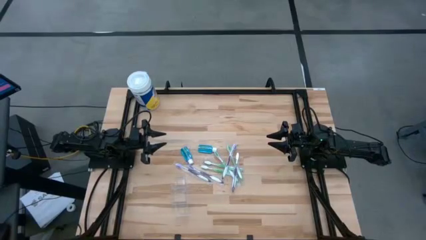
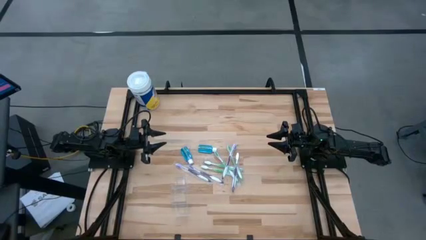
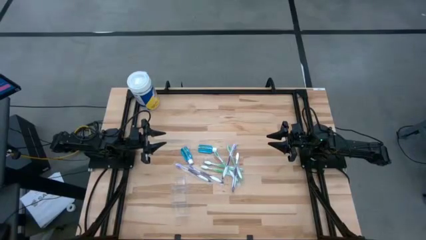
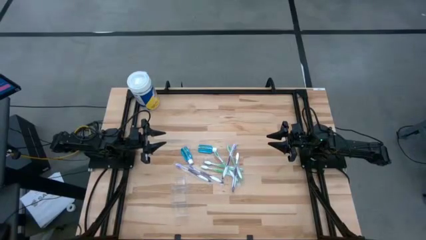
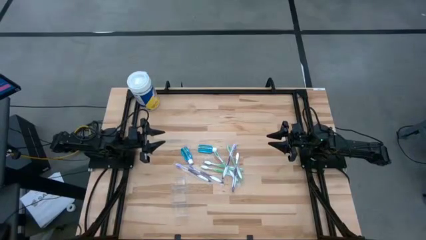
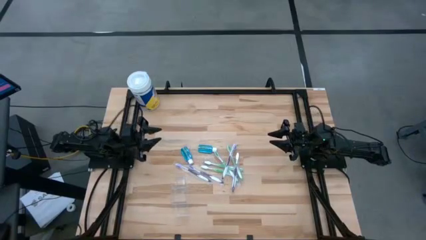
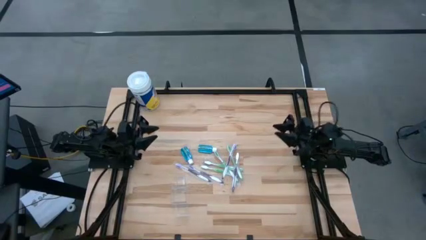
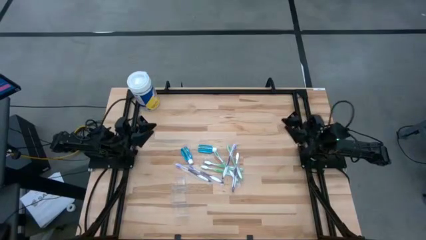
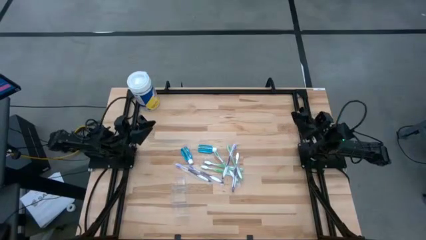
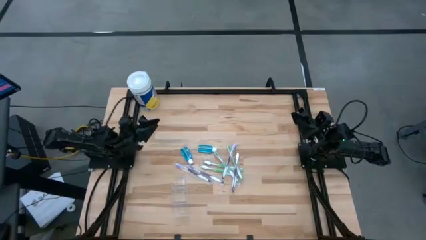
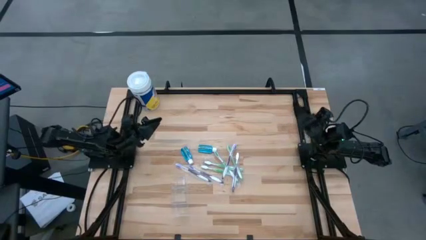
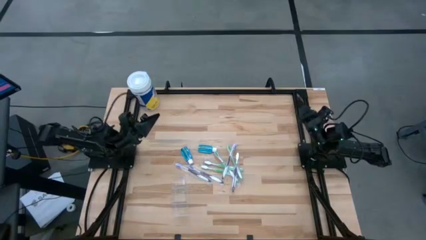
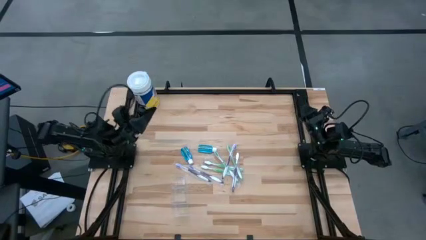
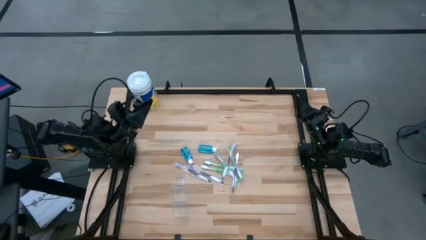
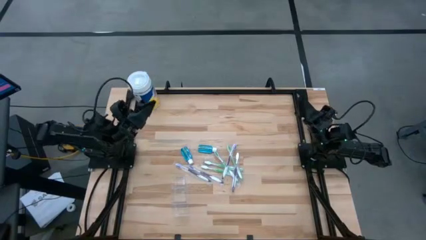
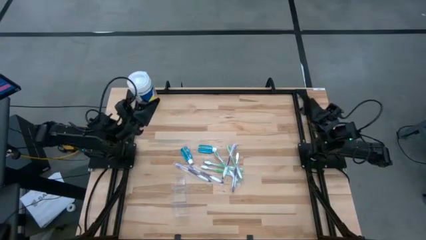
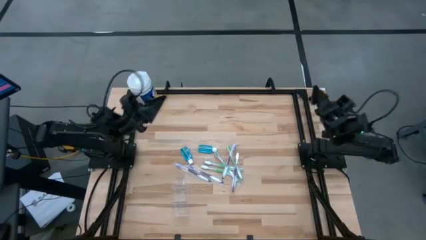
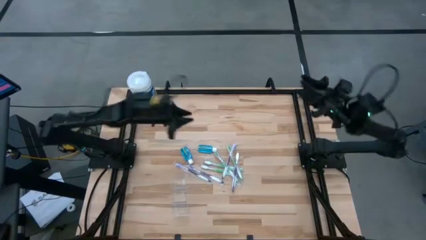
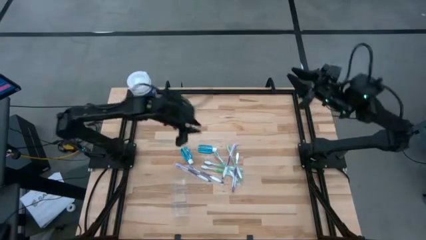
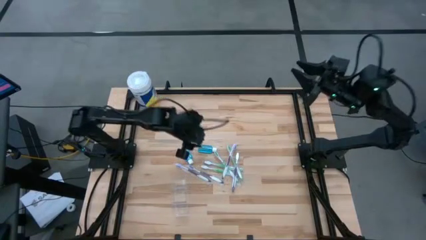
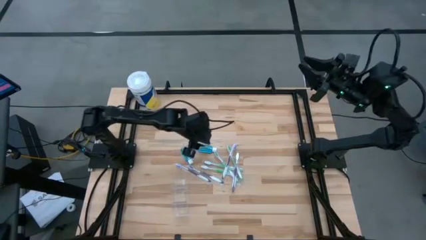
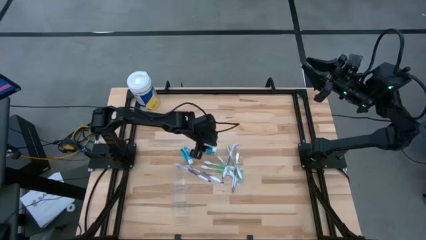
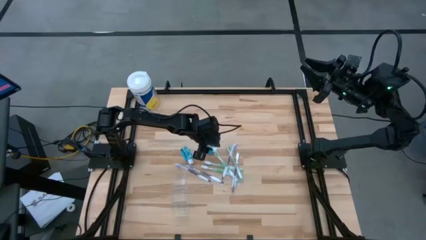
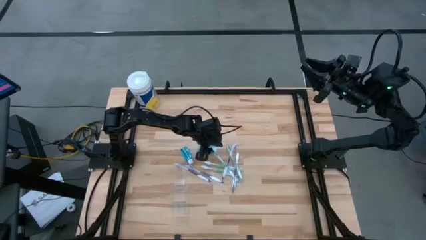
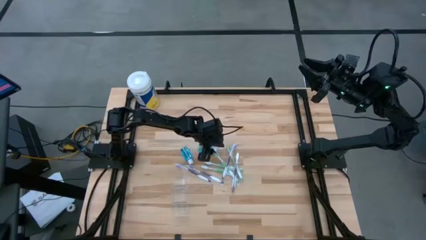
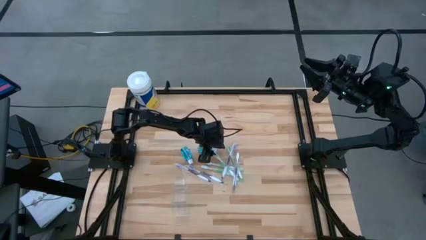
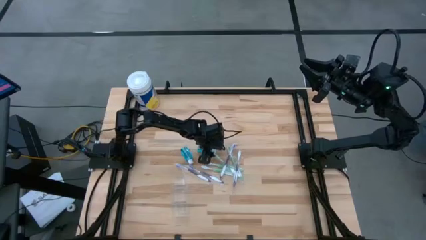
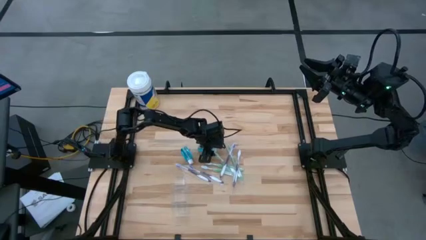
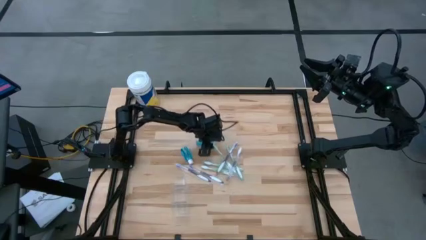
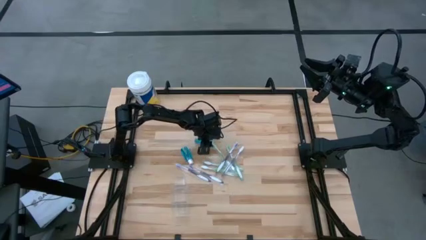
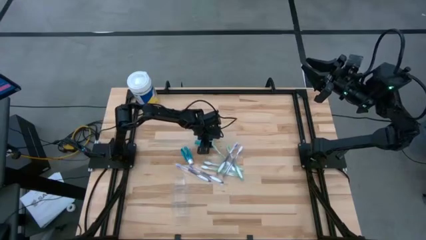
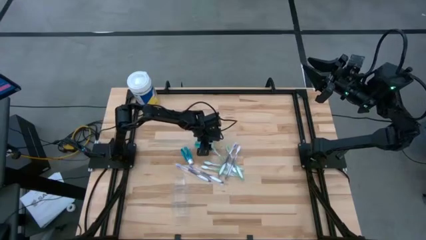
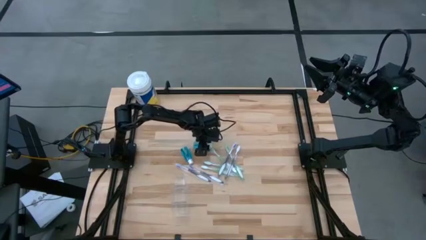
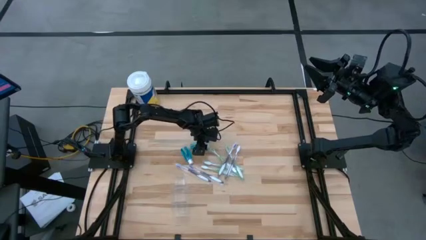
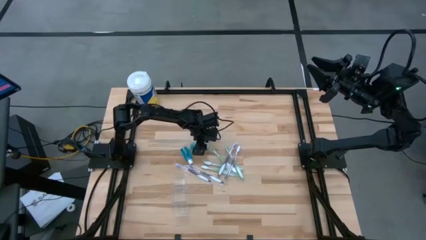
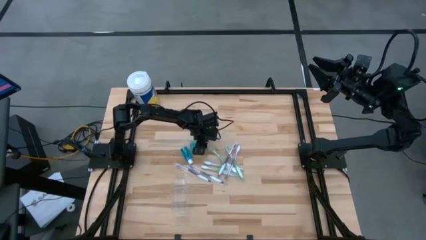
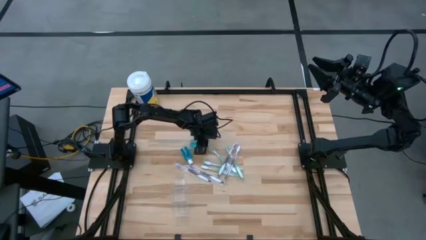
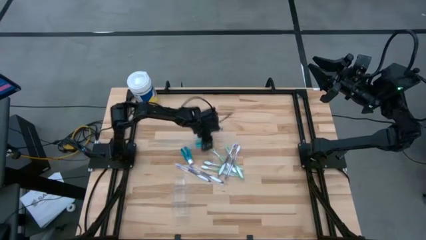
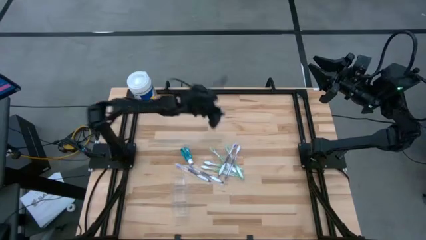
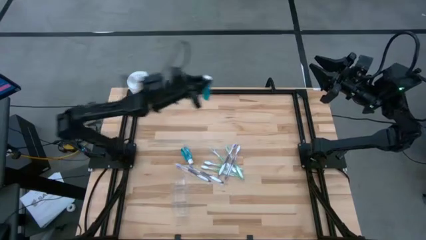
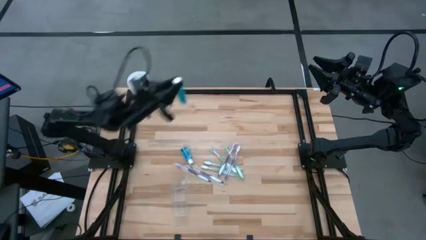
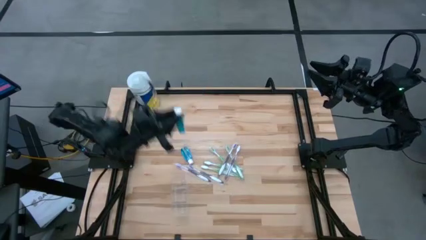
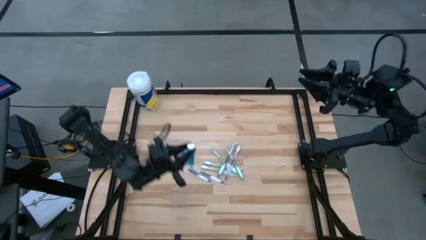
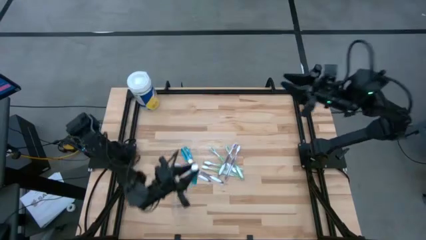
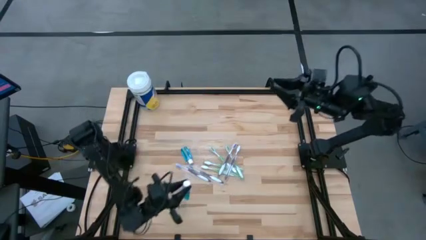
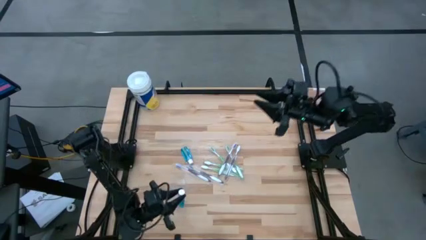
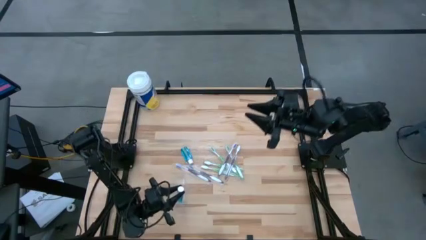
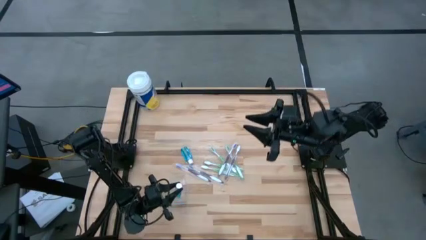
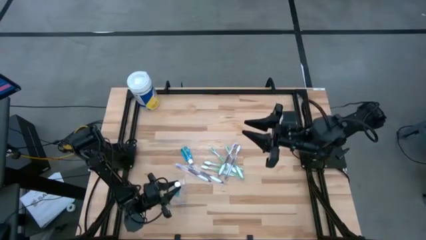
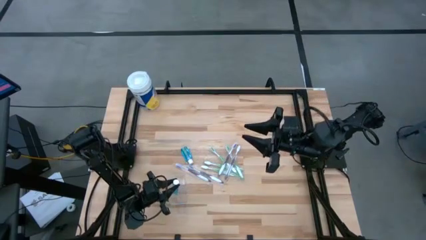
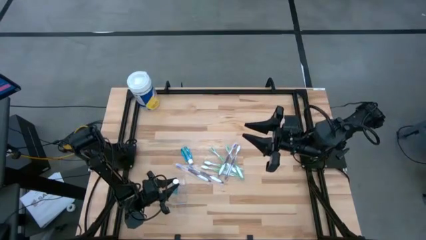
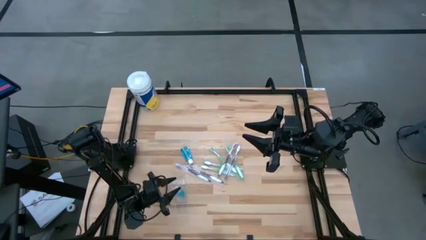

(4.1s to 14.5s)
Task: Pick & Place toothbrushing station
Put the blue mouthwash into the transparent organizer

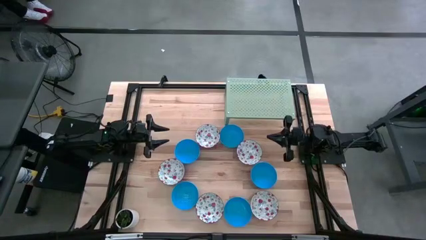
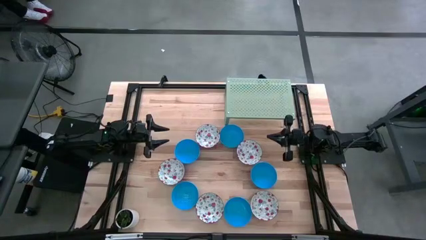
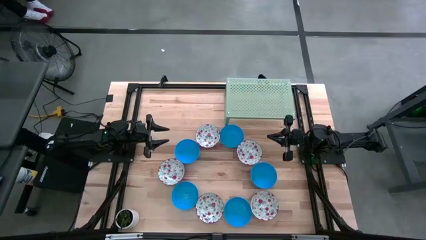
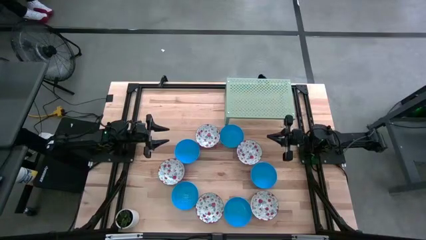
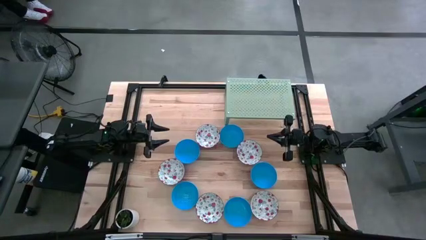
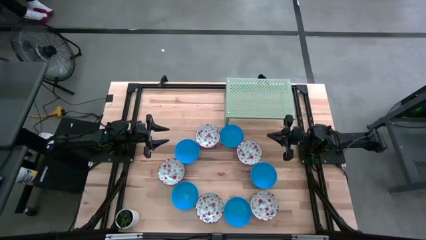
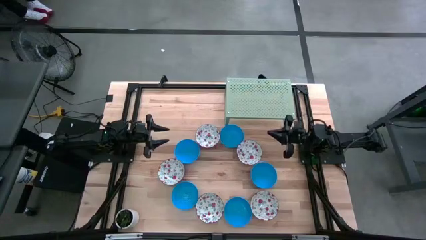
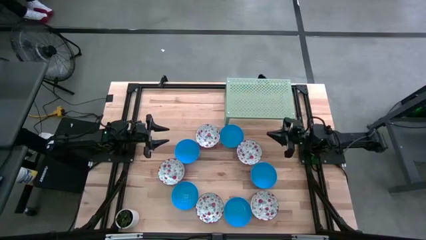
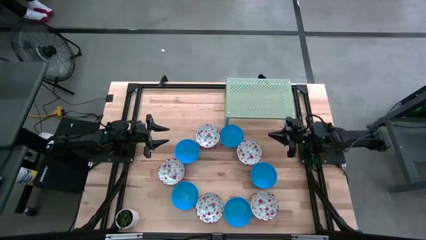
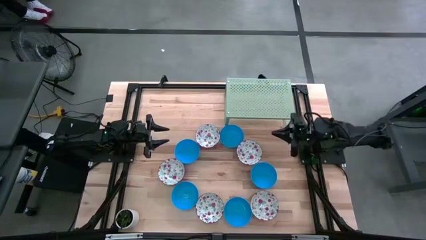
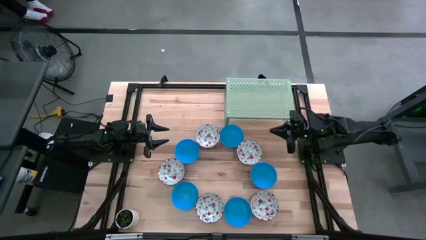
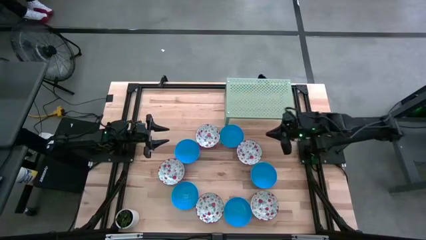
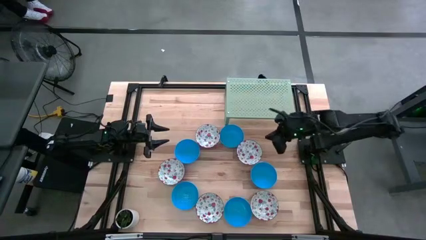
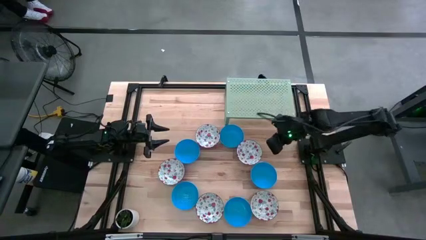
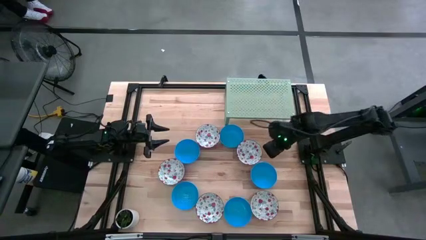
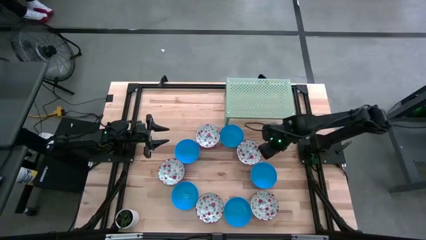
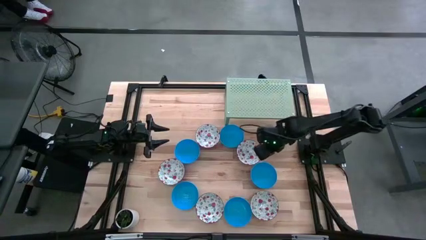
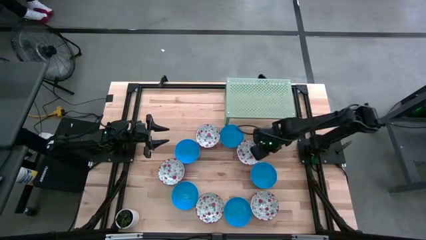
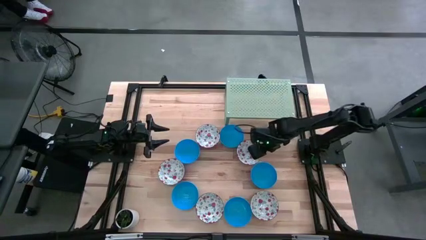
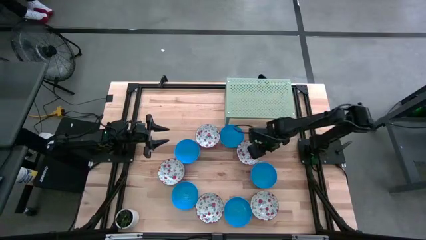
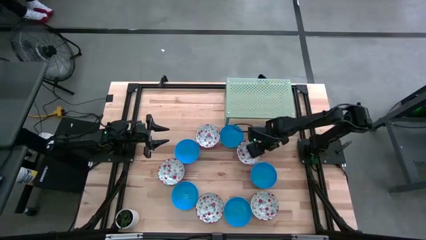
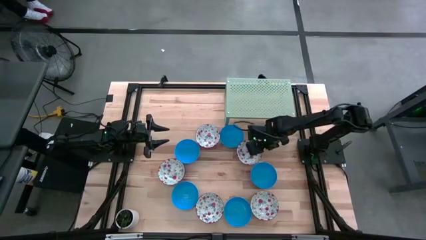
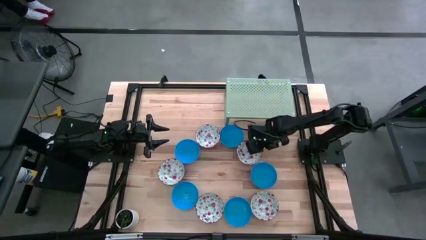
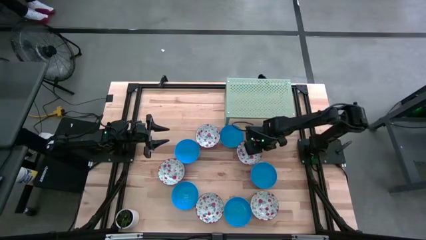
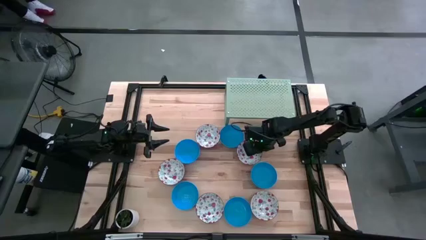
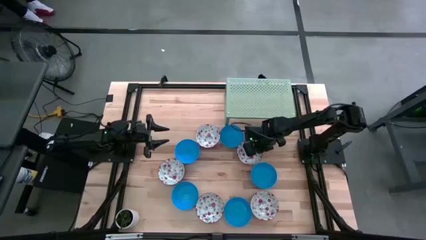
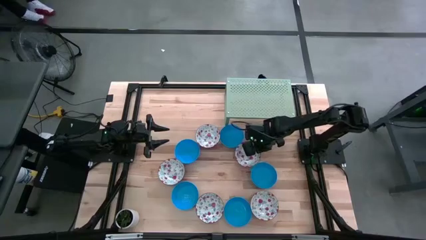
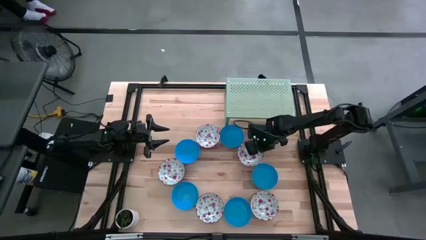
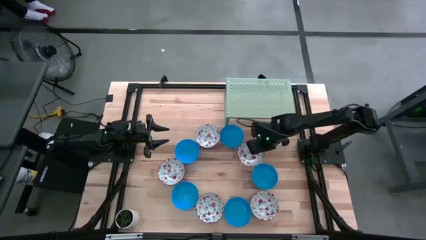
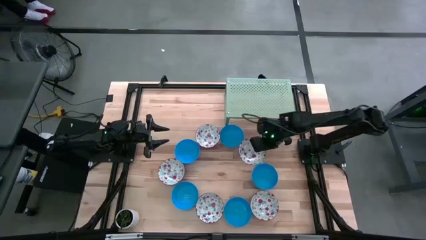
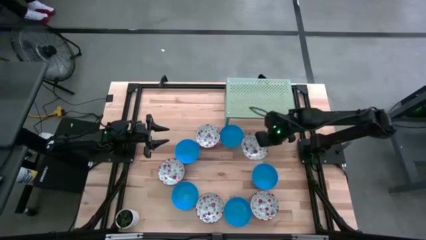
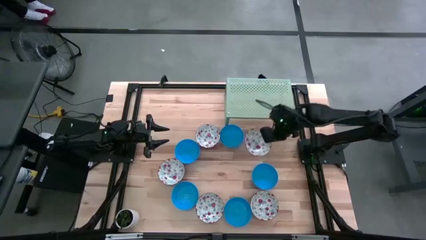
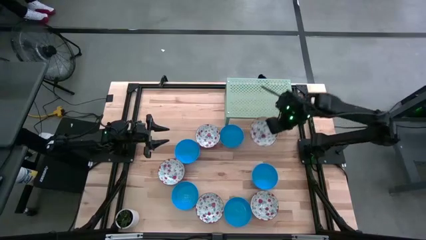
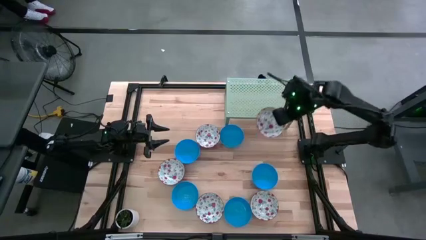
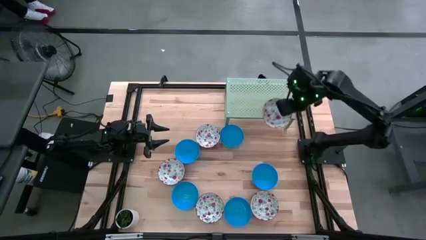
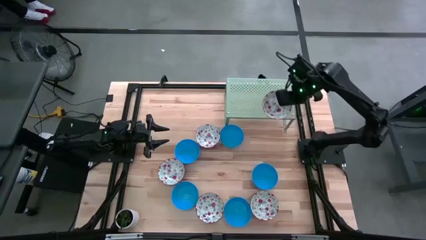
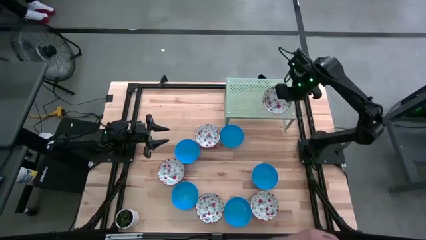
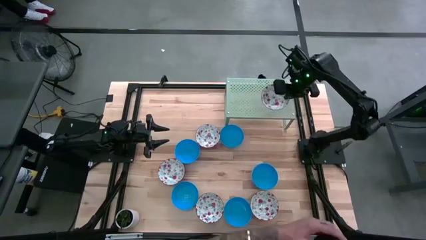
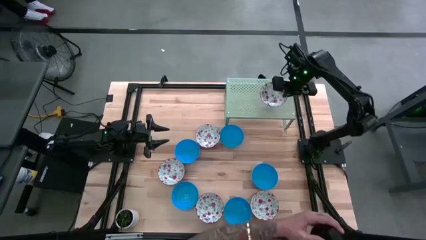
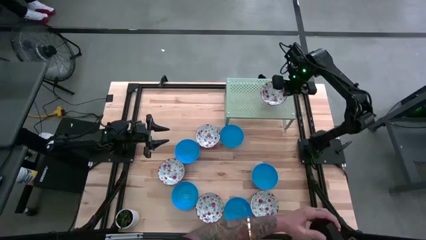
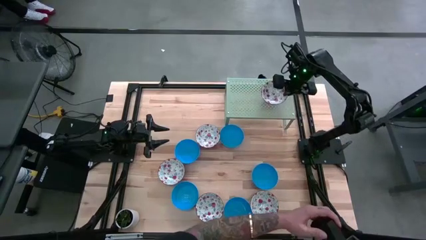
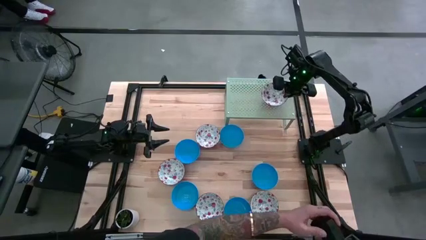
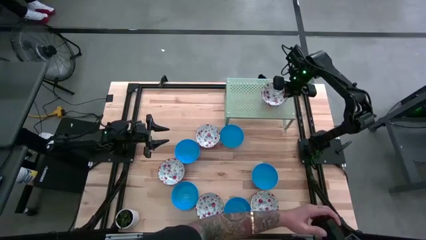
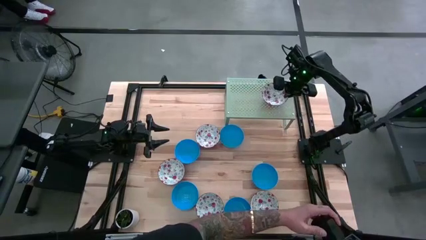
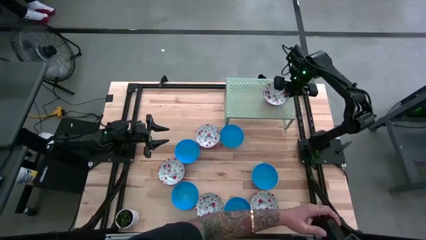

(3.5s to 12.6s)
Task: Pick & Place Mini bowls
Put the white bowl on the green shelf
